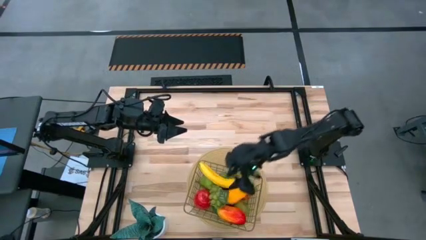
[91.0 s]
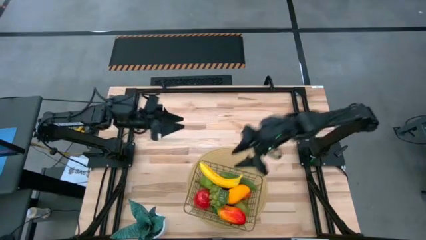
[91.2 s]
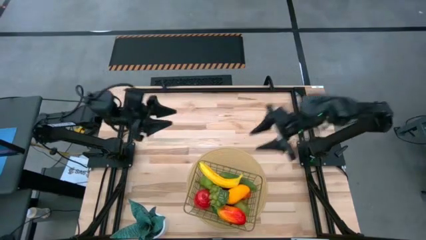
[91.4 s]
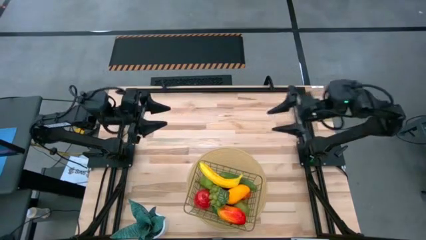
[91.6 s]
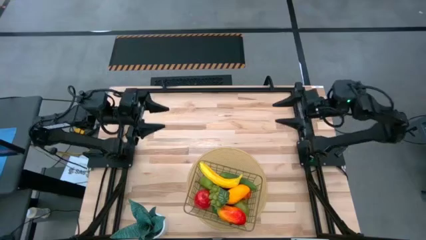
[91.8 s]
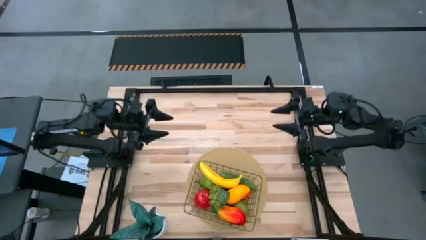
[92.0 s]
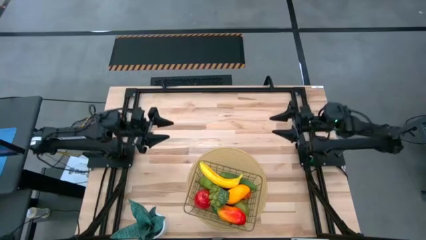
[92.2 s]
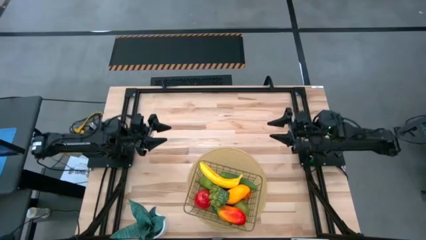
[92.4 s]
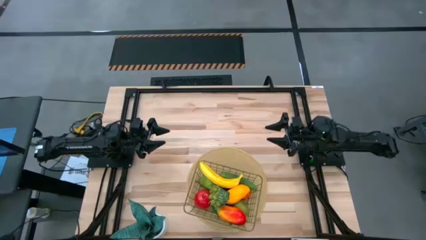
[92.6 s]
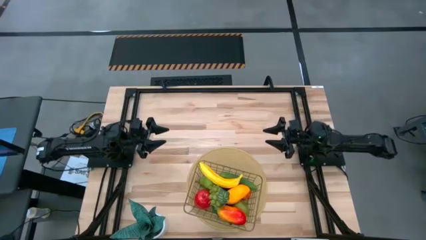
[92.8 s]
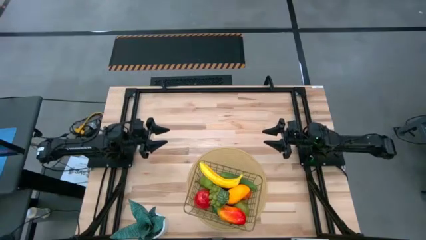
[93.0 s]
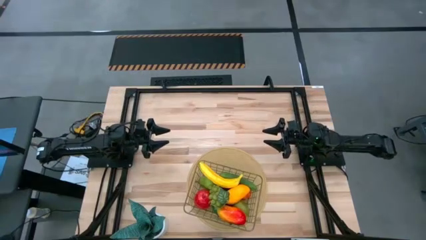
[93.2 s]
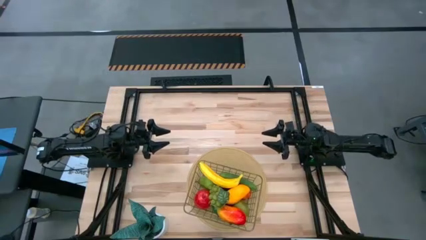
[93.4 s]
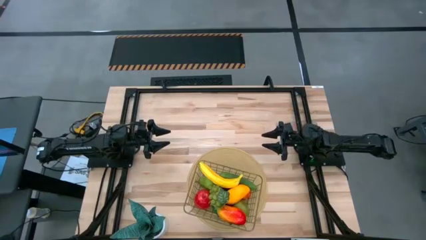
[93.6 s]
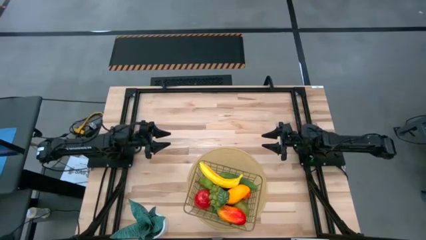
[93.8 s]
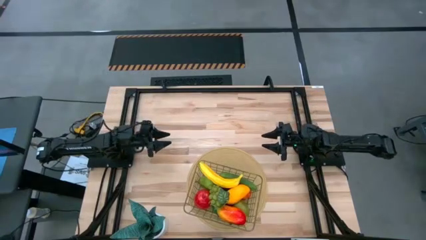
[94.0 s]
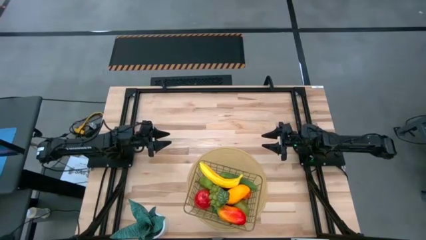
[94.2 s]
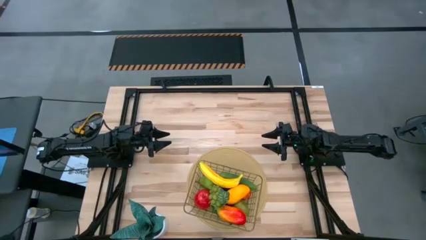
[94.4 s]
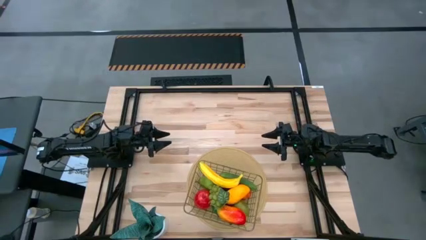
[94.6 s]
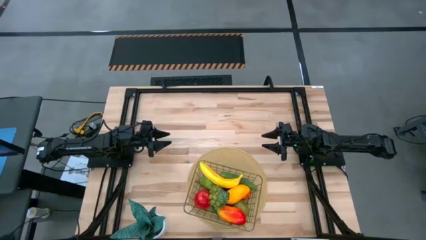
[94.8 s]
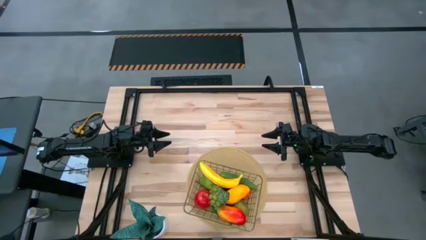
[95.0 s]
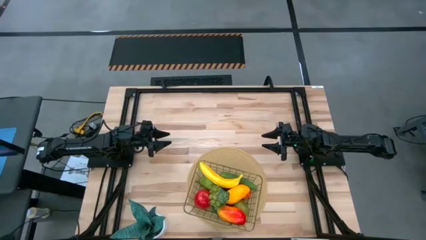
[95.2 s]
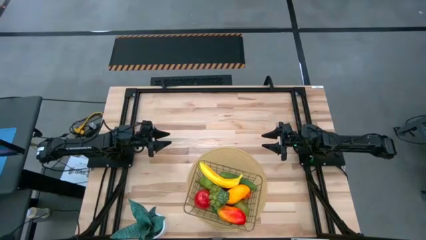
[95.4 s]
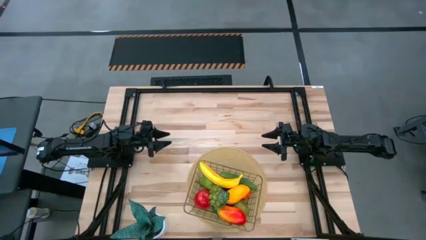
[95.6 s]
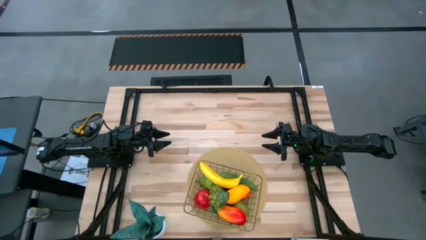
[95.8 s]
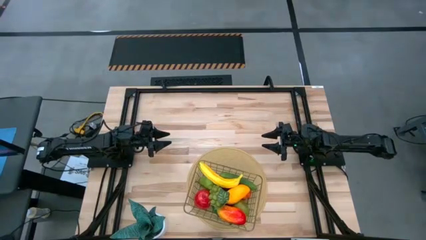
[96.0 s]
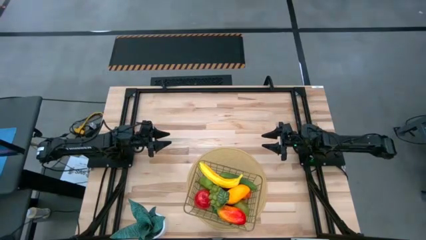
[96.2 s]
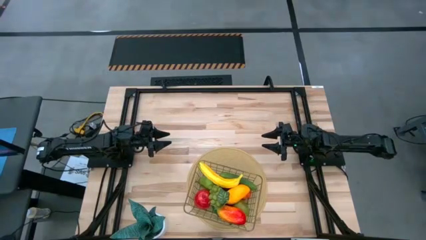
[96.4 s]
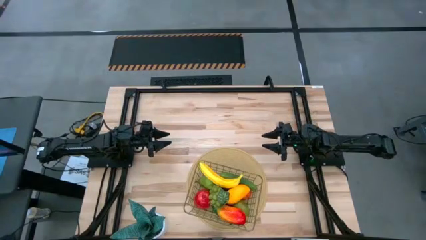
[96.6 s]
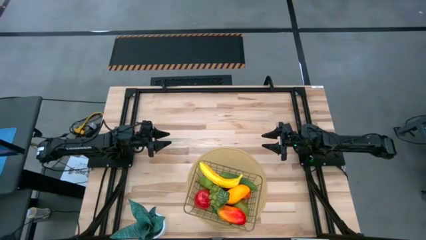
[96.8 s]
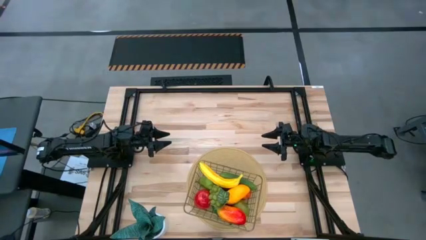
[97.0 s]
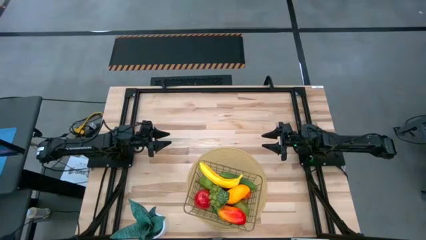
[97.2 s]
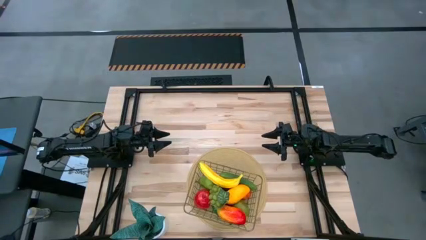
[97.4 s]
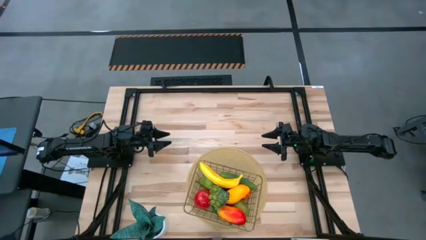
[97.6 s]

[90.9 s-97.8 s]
Task: Build produce basket
Return to Home Position

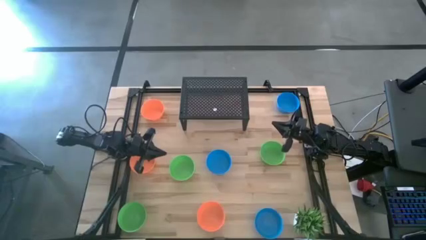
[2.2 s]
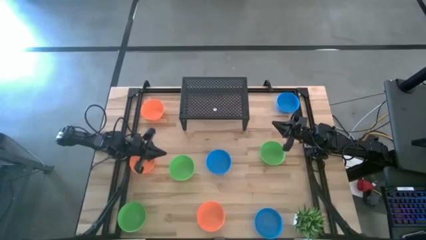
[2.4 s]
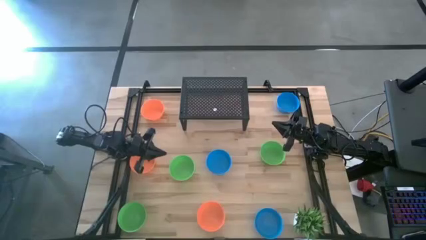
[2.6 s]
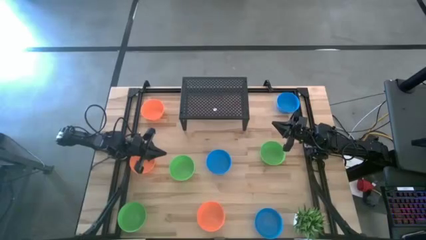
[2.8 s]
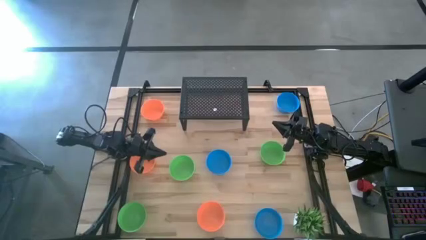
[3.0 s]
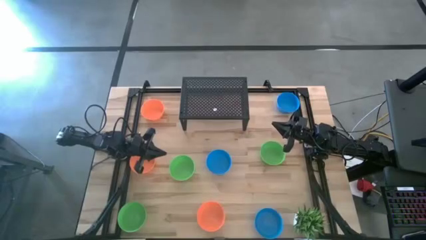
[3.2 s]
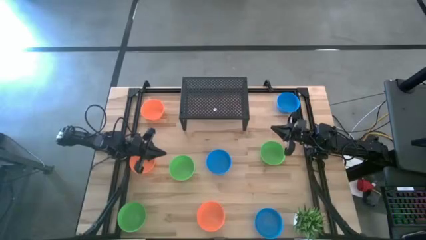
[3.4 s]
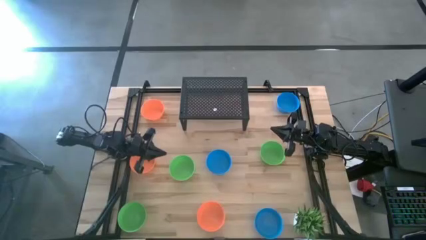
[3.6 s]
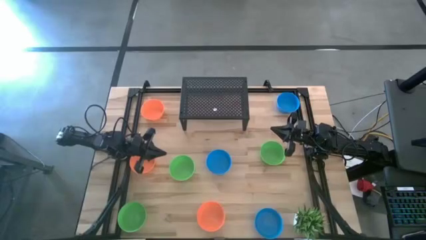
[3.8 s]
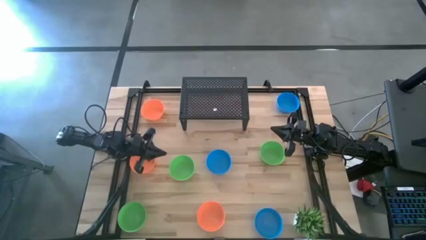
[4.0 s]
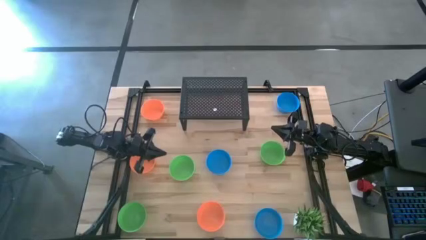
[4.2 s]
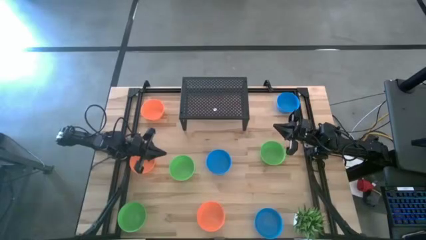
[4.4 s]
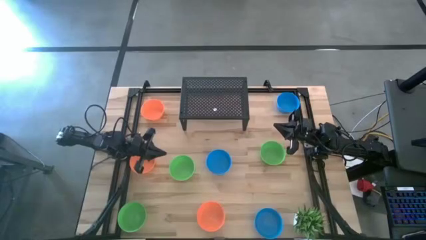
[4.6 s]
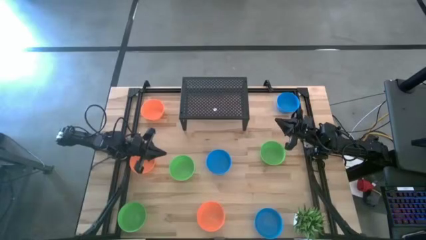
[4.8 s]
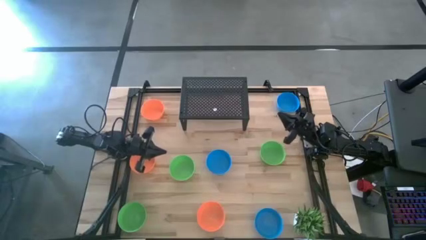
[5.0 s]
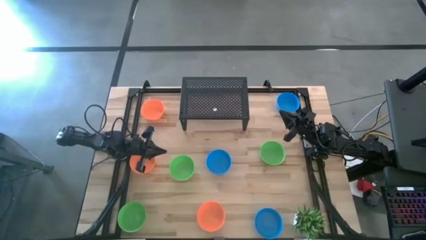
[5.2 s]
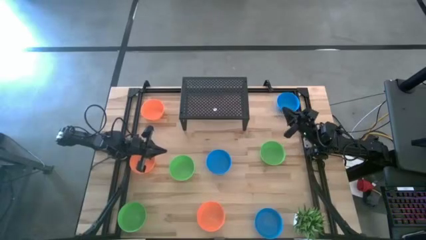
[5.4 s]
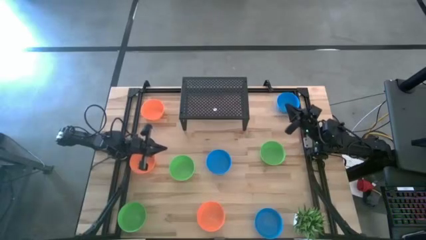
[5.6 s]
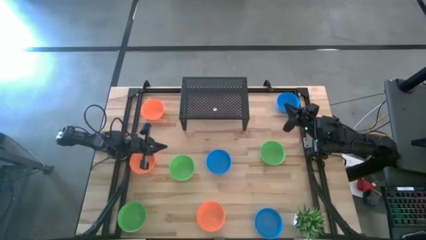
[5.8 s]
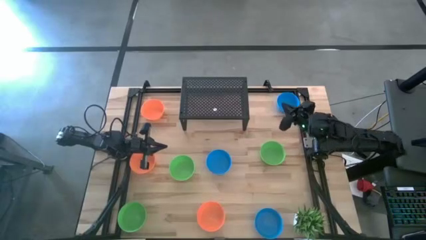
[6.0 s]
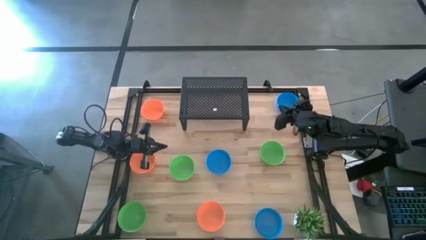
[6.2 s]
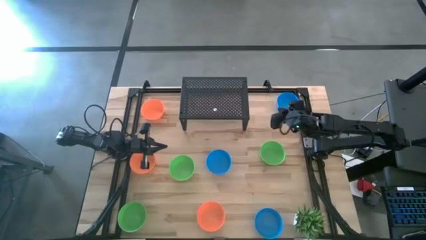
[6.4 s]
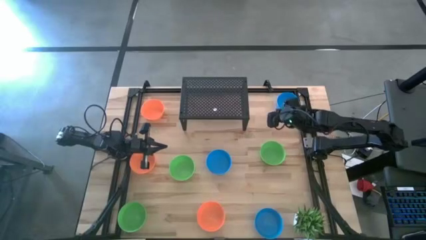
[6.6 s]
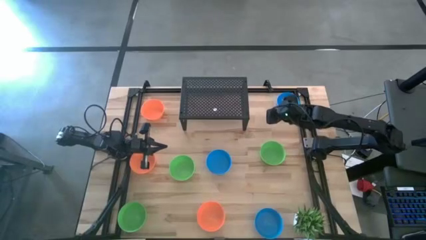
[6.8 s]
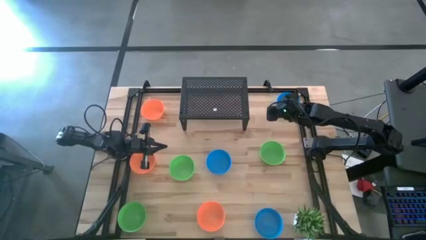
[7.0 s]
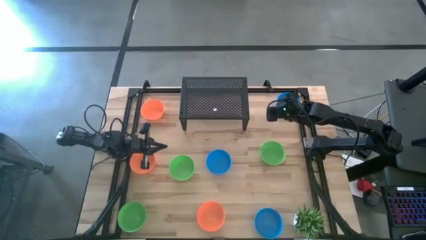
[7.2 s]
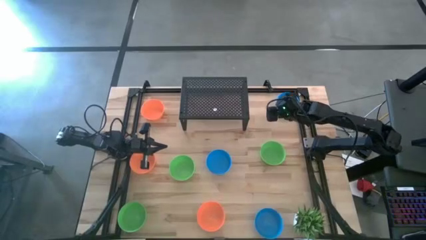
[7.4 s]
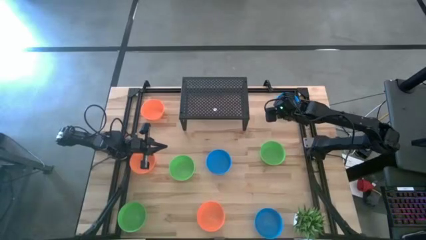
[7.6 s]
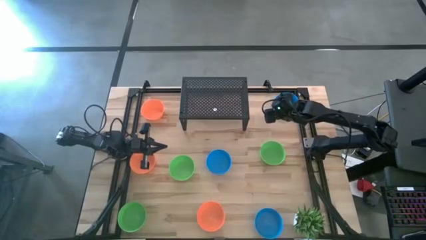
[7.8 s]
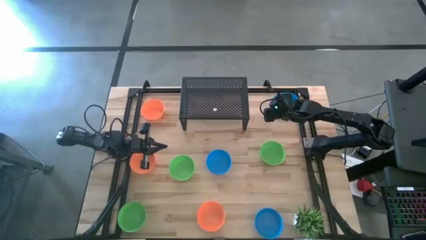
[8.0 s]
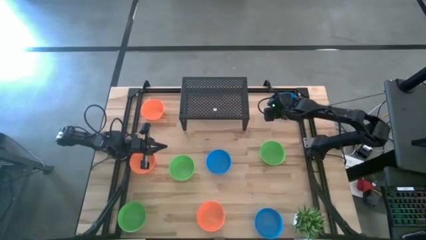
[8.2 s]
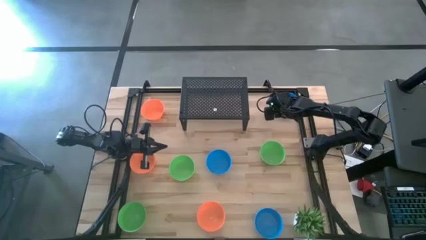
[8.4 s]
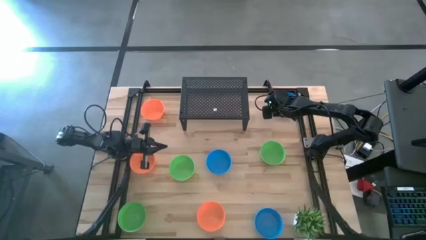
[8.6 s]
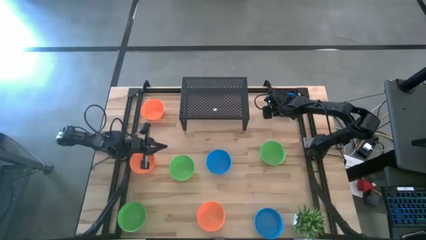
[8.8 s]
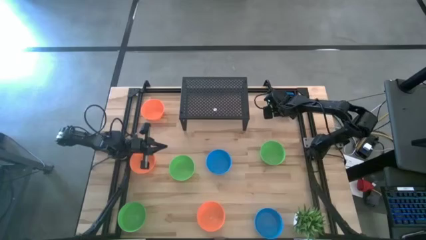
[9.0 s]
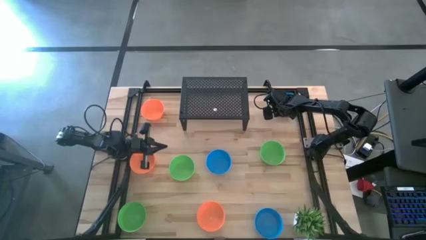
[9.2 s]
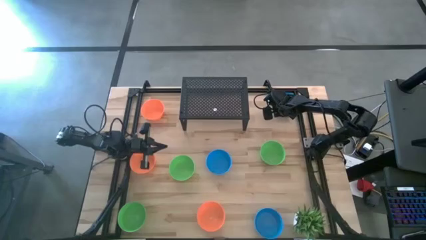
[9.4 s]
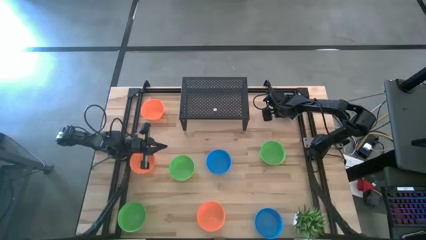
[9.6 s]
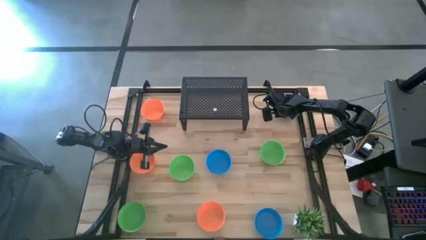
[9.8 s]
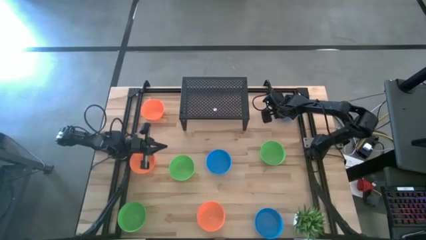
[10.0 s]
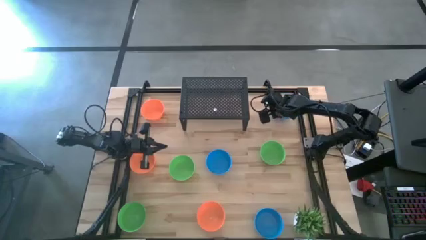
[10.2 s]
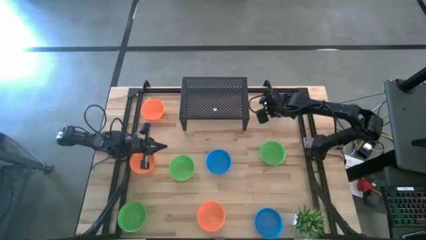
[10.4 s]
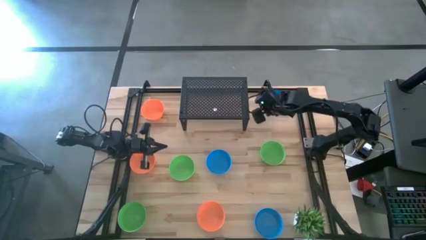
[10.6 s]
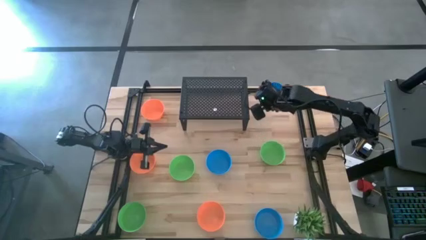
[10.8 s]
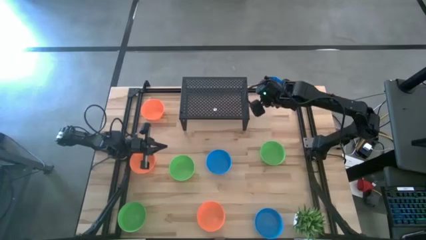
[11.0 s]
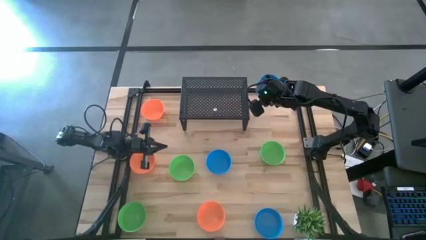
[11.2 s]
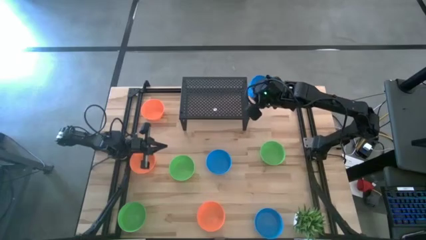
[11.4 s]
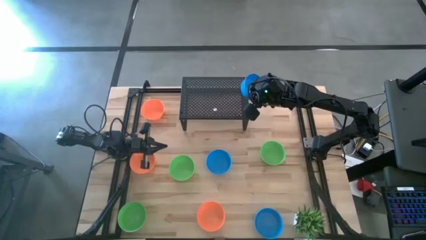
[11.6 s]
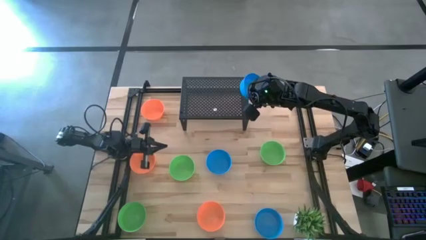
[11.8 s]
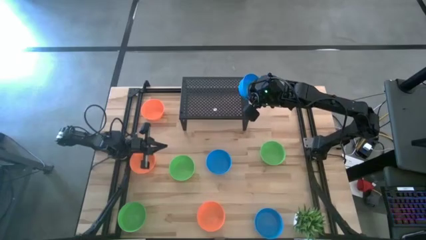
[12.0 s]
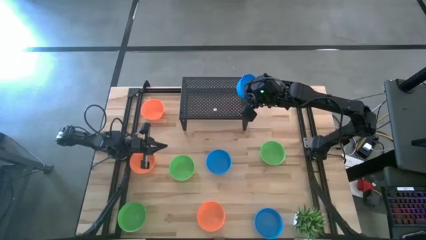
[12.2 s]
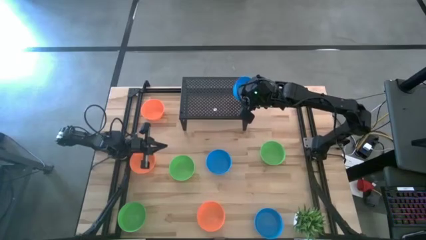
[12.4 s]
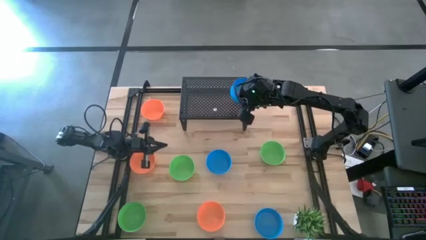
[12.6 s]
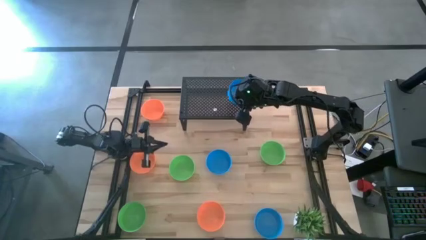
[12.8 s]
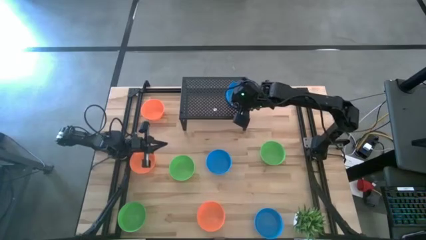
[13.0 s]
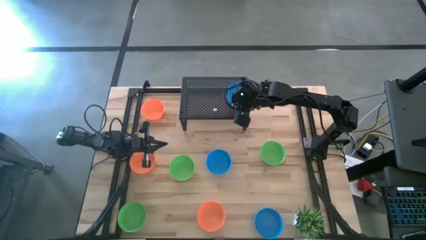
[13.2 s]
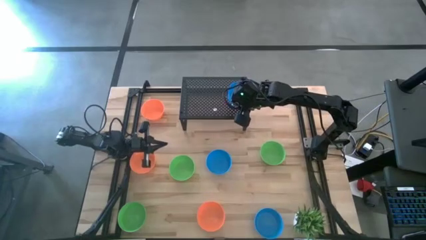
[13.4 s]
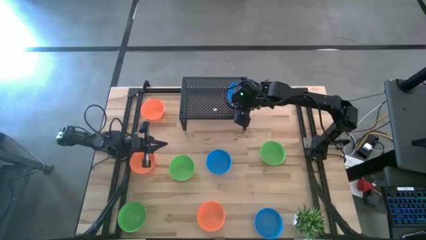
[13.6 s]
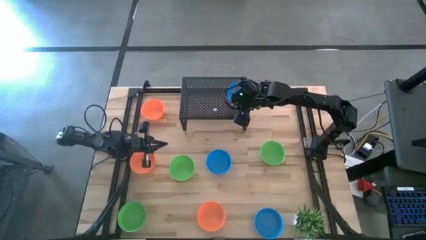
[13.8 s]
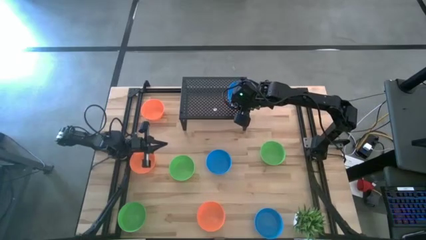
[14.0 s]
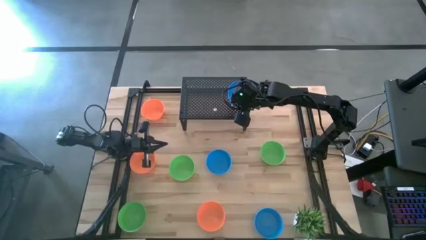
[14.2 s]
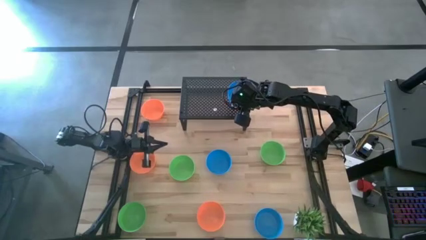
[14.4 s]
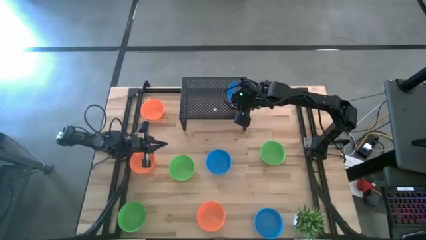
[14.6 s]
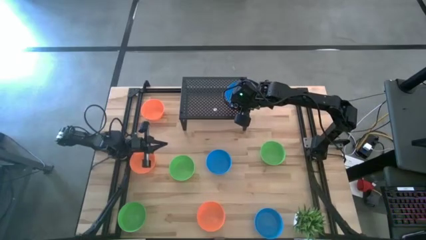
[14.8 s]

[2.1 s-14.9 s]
Task: Pick & Place Mini bowls
Put the top blue bowl on the shelf
